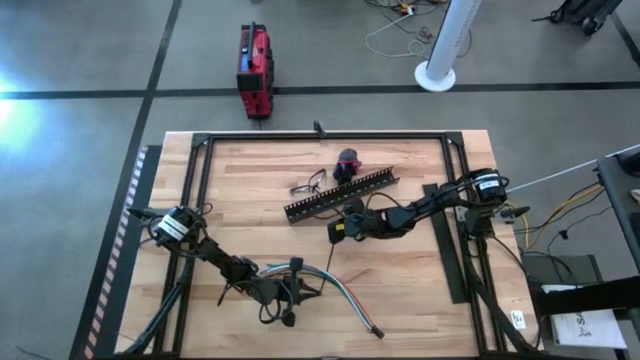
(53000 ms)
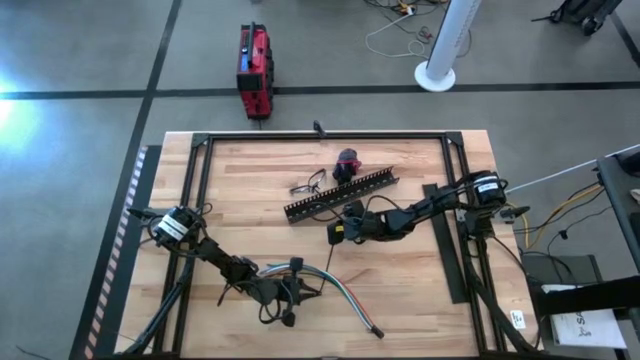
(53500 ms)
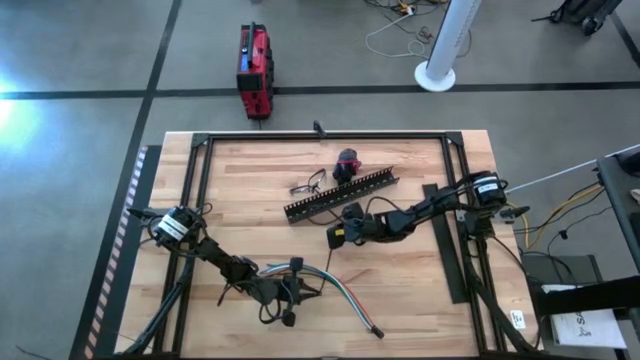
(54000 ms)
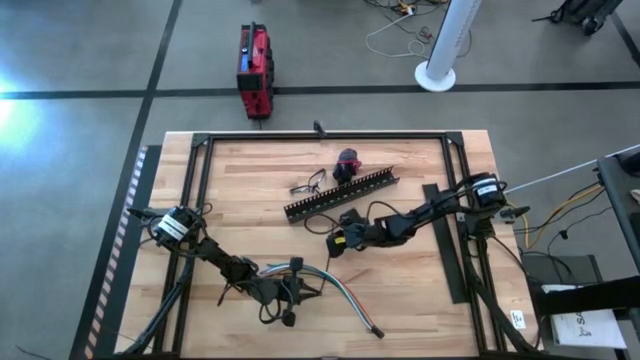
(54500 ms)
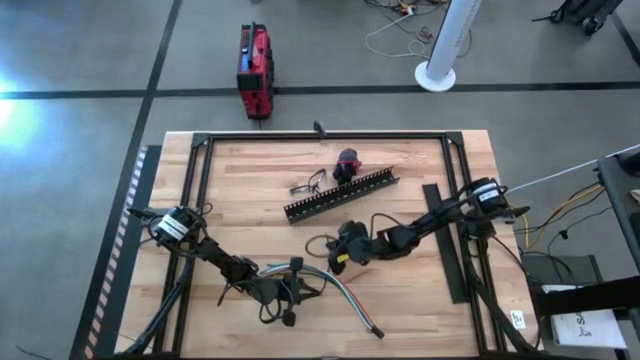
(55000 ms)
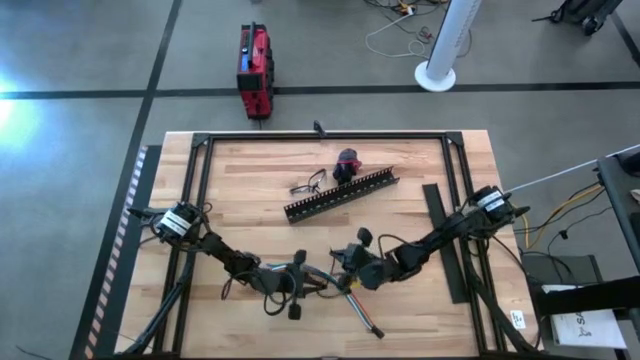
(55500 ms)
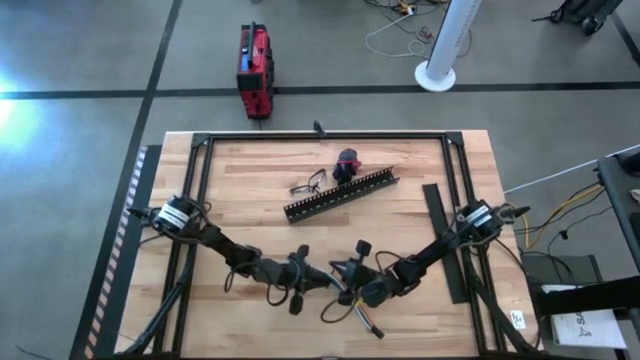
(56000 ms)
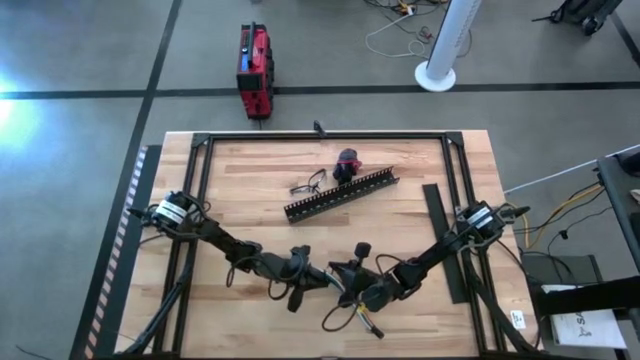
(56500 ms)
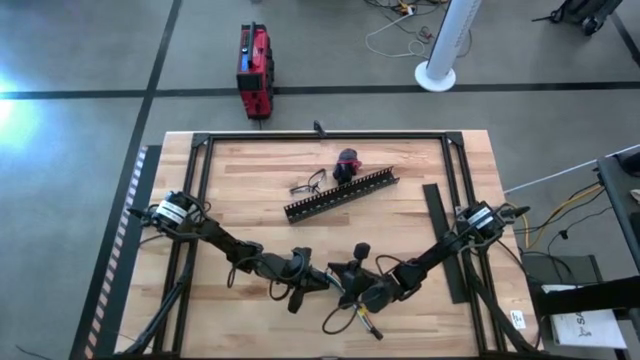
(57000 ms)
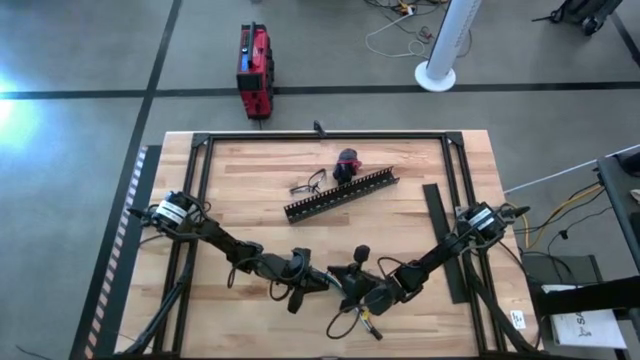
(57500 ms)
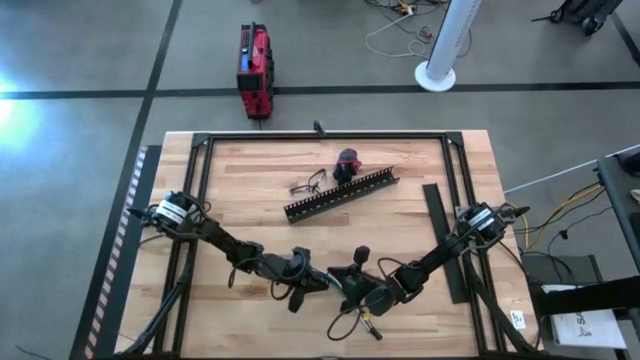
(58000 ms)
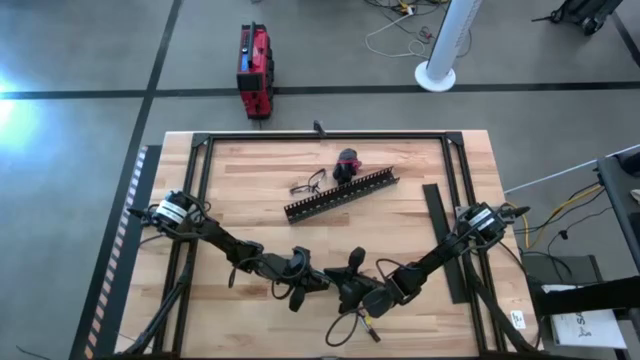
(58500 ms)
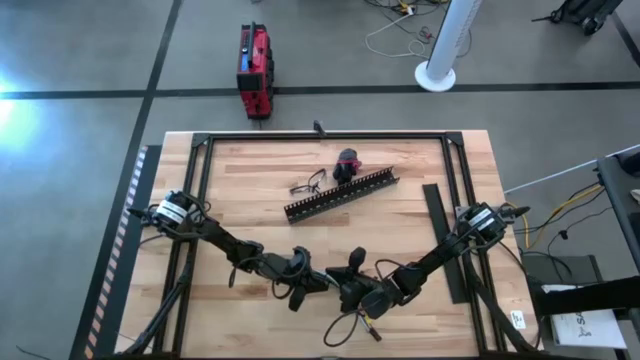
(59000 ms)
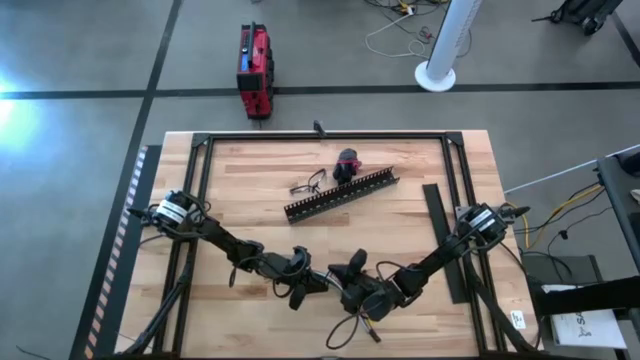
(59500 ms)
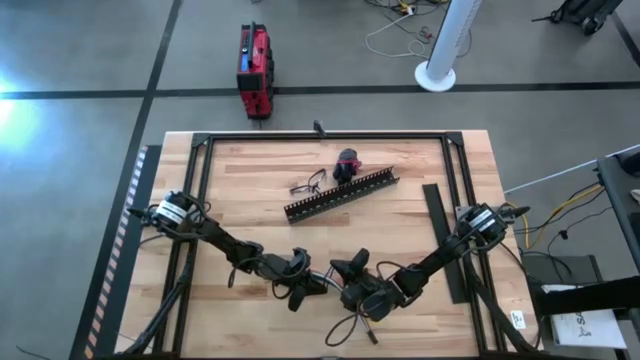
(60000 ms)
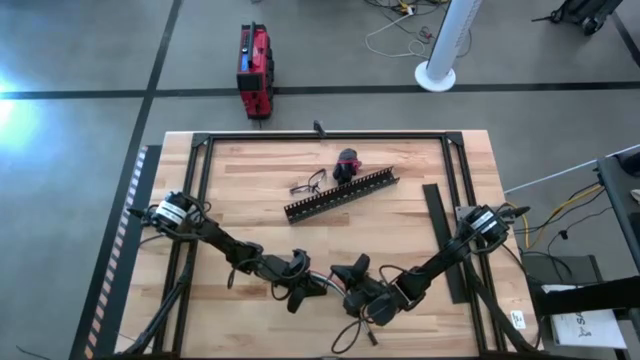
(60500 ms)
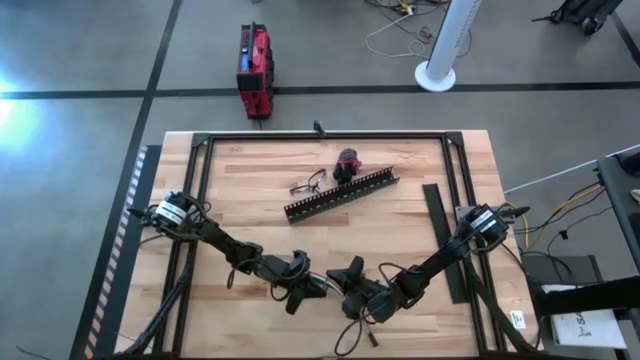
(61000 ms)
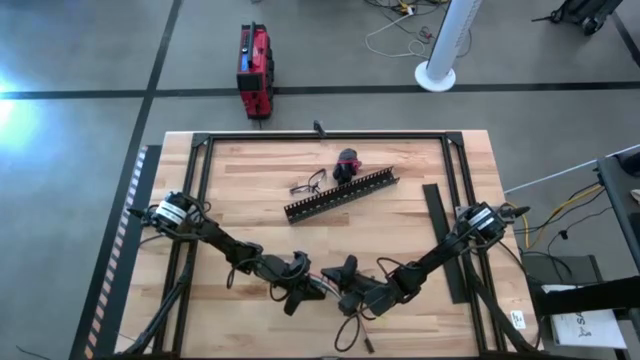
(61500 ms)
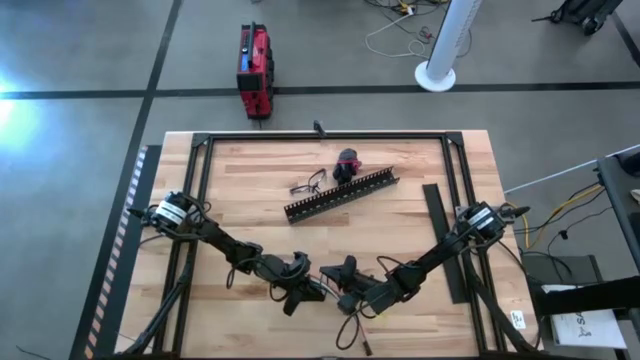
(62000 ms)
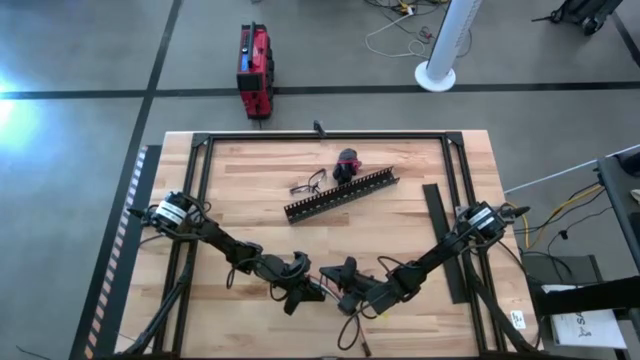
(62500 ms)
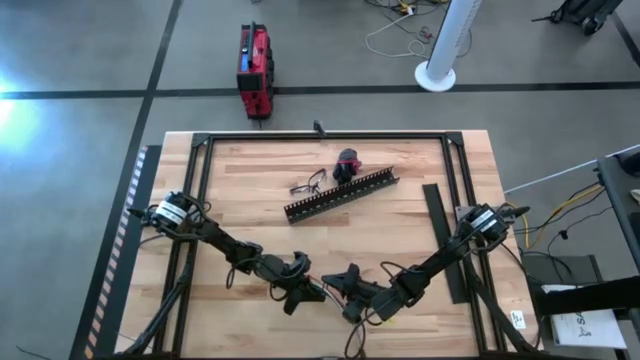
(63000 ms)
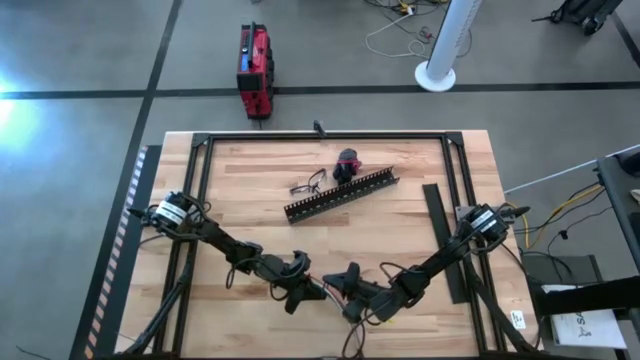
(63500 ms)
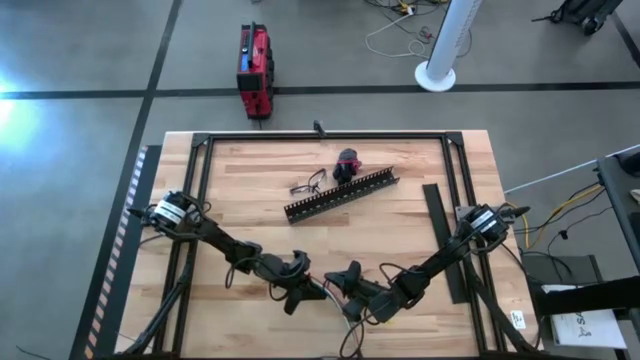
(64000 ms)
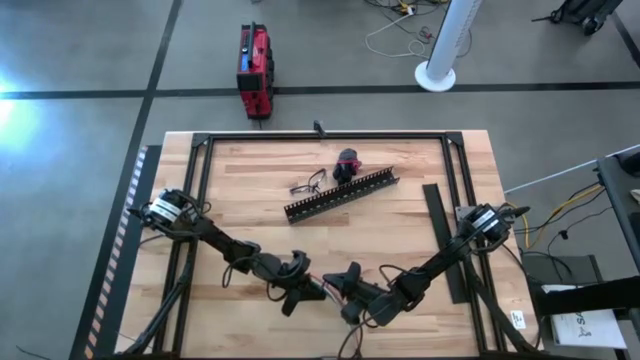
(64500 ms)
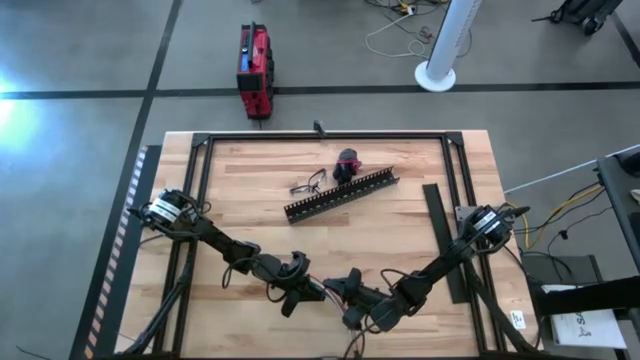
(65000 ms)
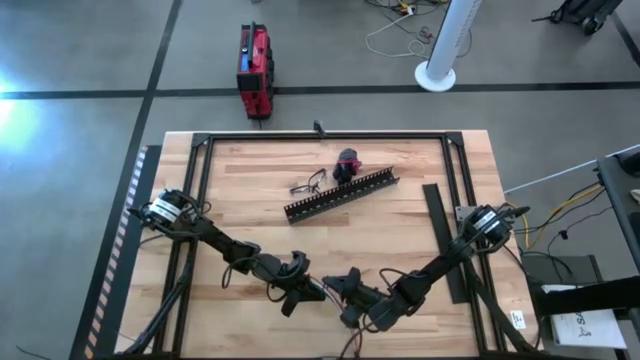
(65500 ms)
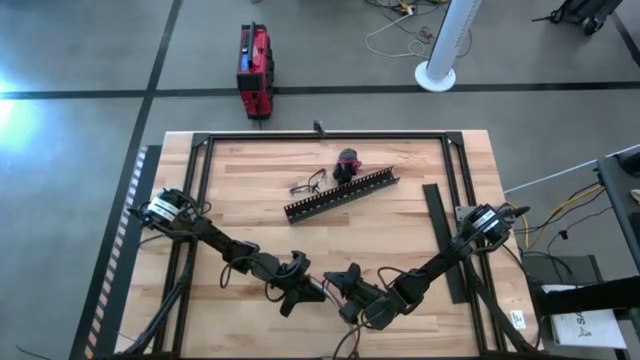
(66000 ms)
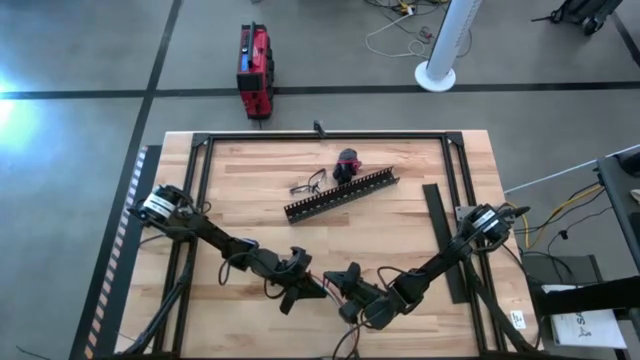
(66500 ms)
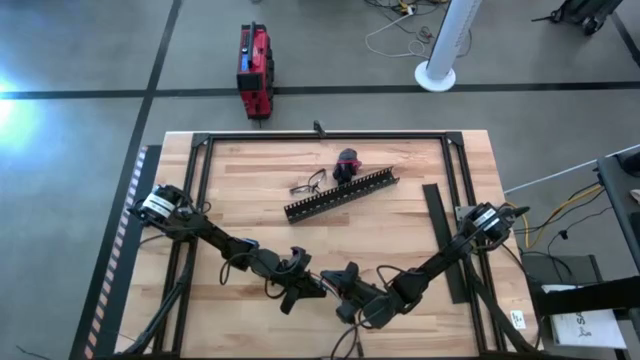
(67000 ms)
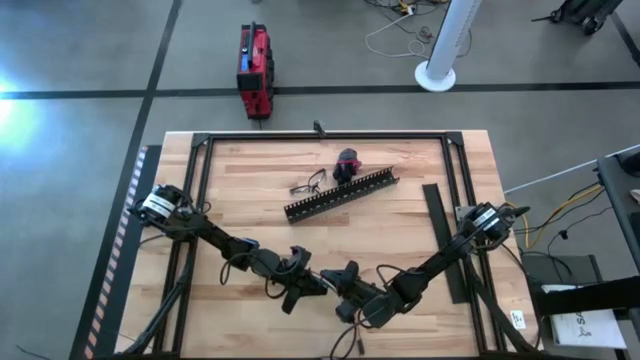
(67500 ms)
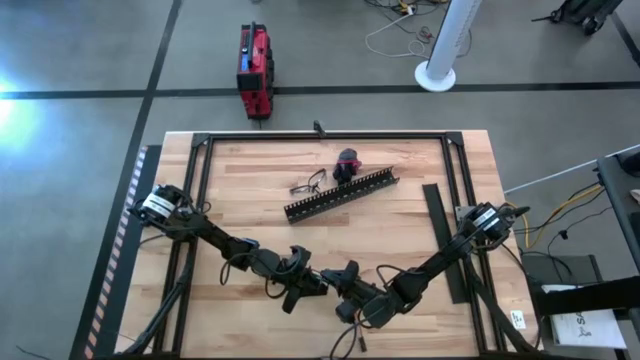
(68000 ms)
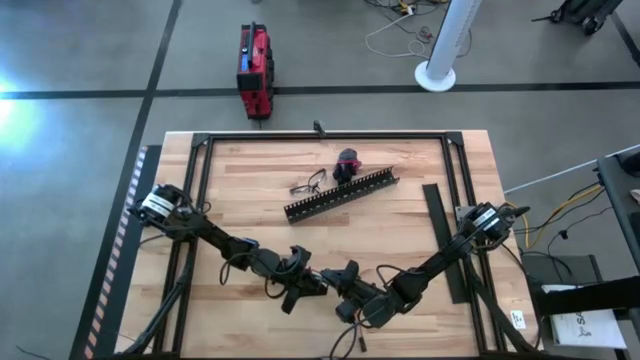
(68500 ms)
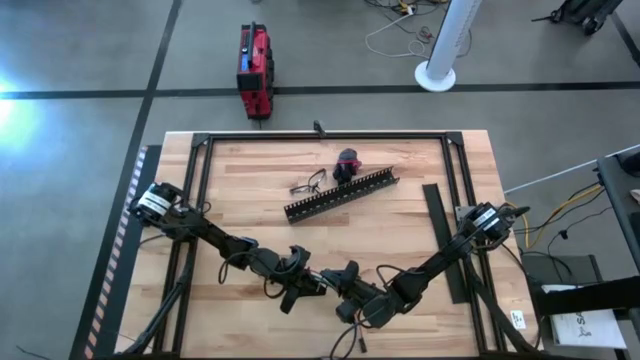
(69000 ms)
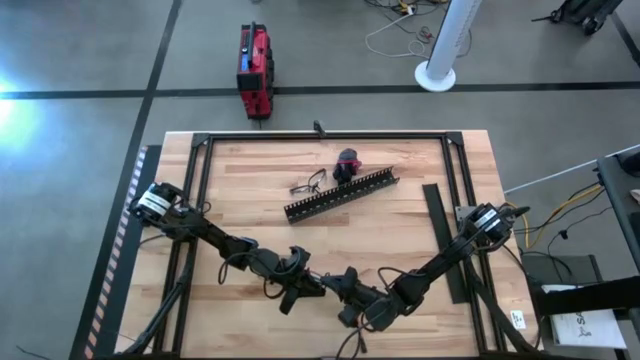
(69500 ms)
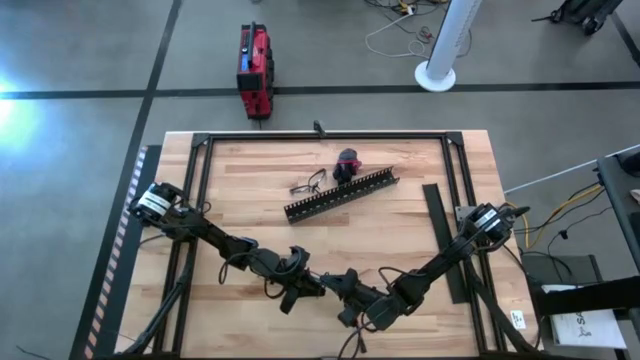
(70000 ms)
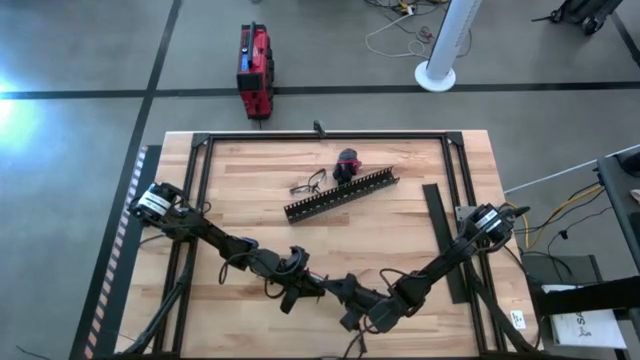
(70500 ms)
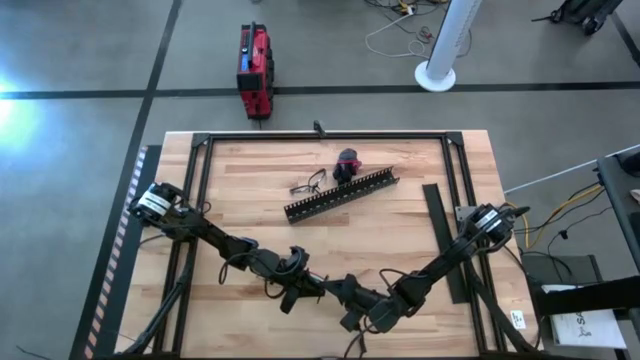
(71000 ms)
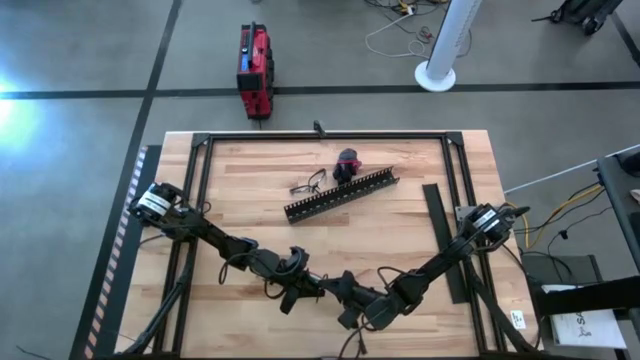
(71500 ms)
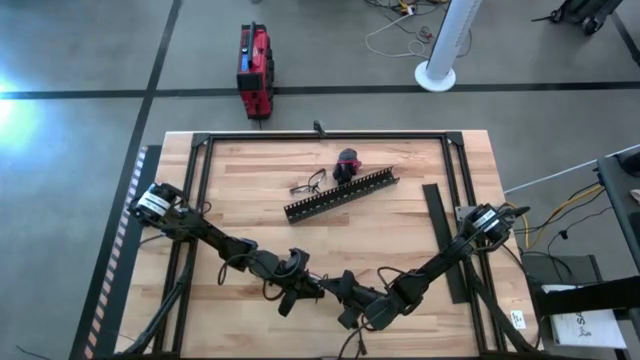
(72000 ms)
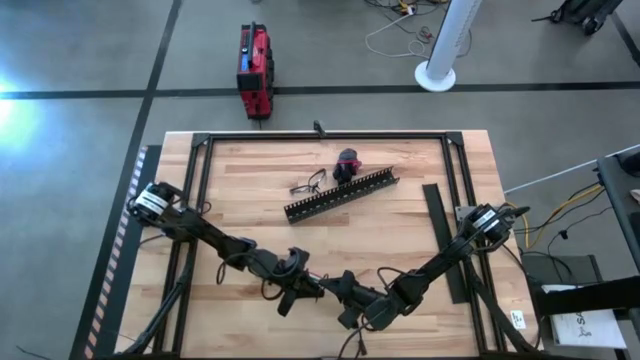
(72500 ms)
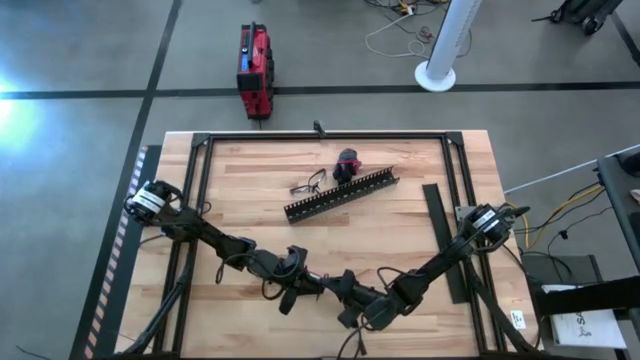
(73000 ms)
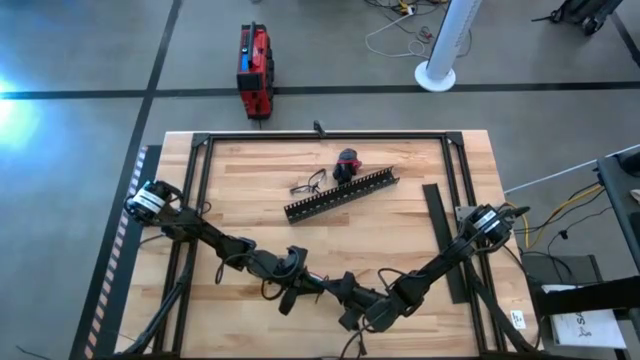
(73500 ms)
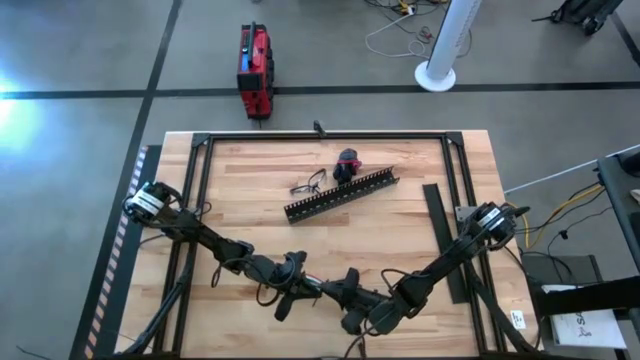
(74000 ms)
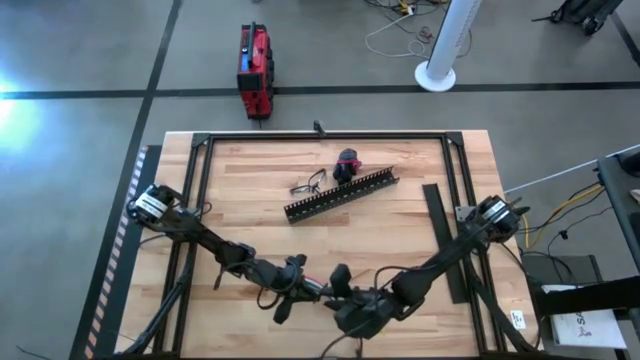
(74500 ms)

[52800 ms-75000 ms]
Task: Ziptie cables
Wrap the cable wires with black zip tie
